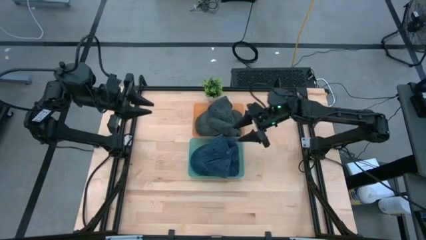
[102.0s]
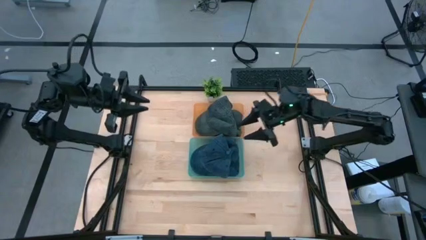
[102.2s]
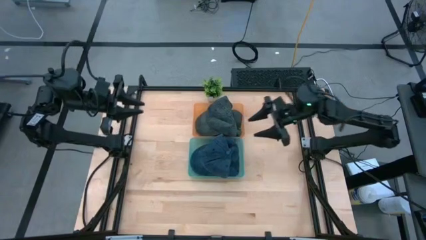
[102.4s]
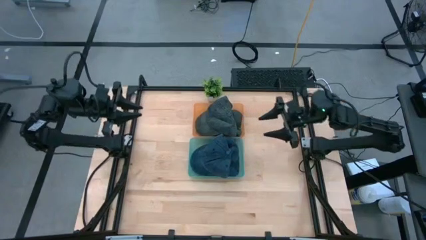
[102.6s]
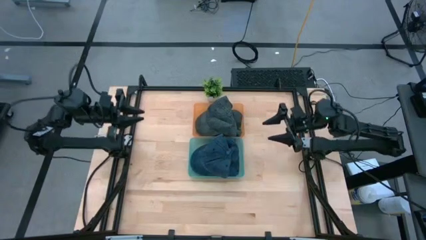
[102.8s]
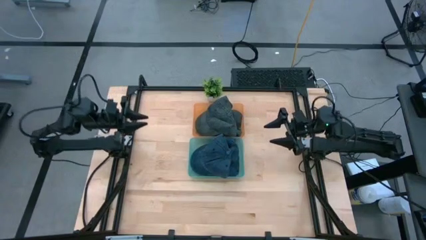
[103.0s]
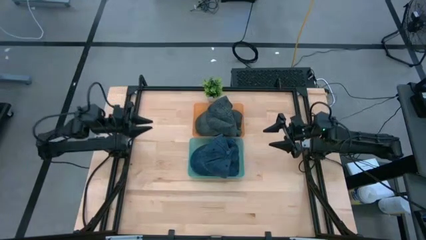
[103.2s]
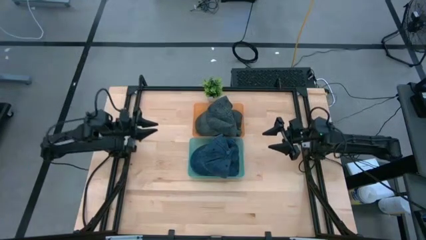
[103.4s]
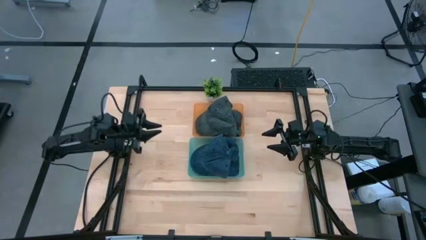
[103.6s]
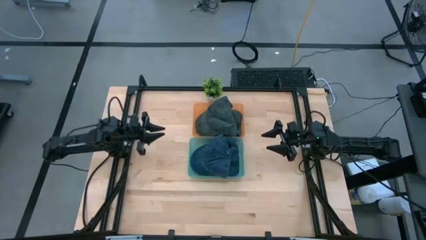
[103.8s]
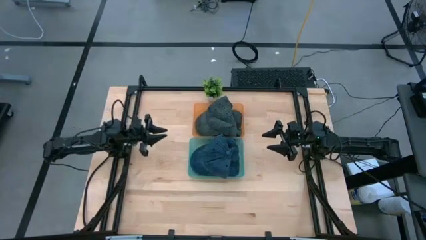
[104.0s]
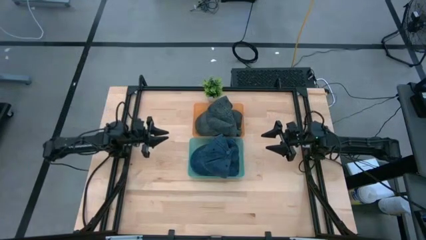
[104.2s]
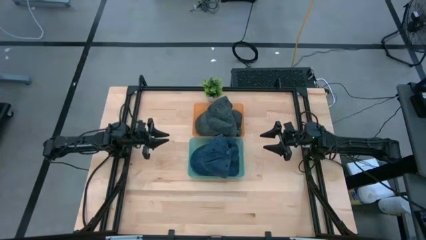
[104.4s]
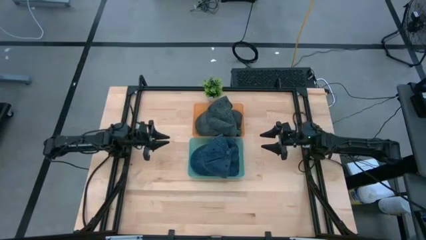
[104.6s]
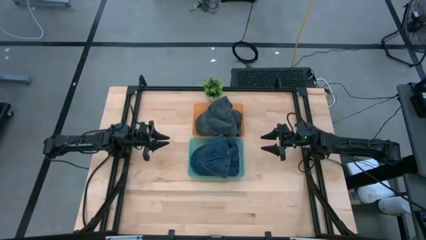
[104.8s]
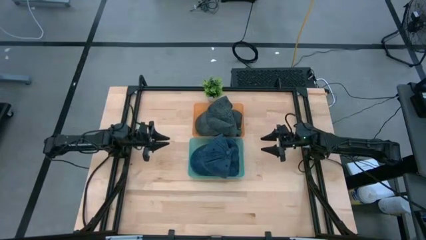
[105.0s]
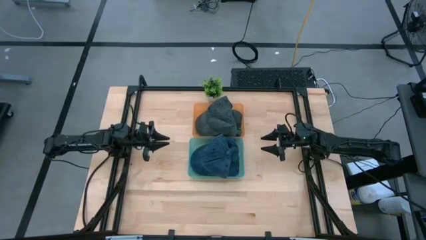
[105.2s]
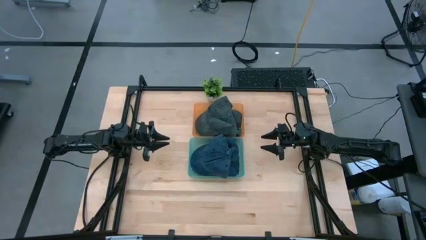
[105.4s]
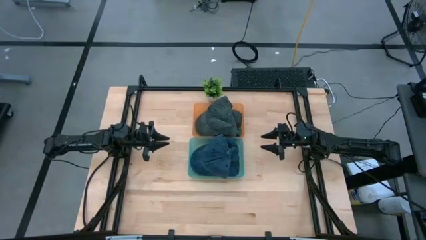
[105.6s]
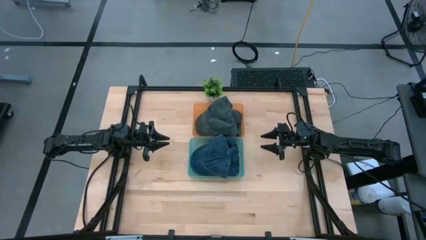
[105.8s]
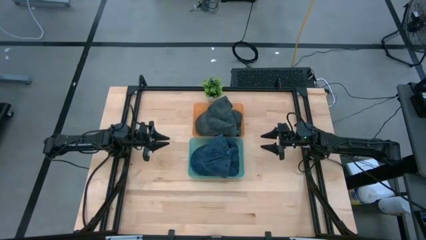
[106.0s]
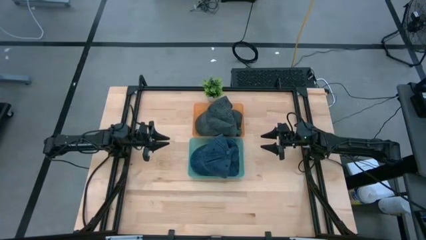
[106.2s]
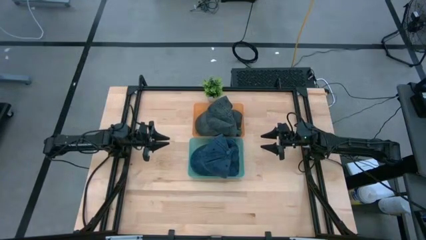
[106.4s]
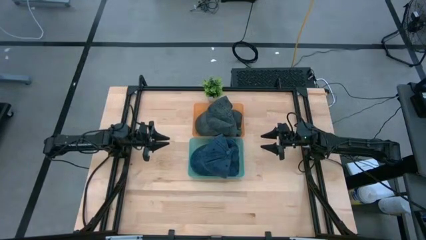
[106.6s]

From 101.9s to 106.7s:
Task: Pick & Place hat
Return to Home Position

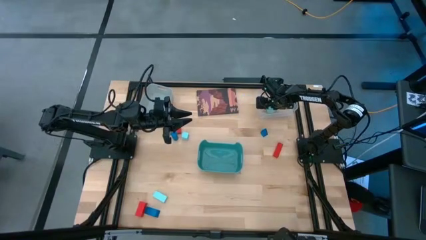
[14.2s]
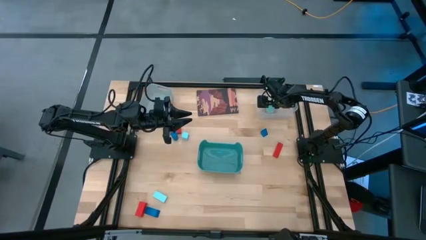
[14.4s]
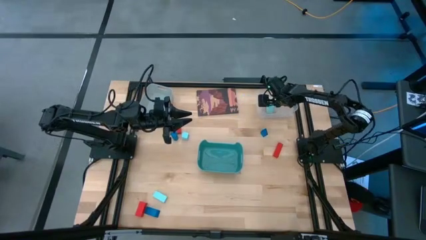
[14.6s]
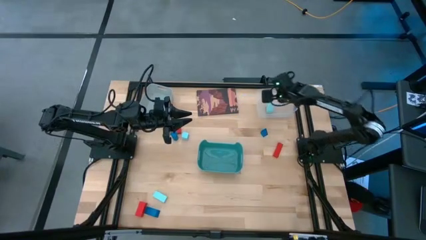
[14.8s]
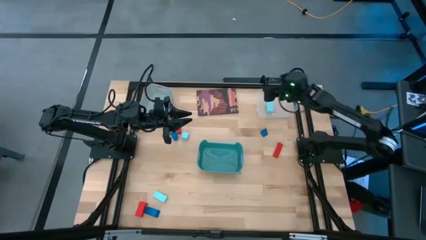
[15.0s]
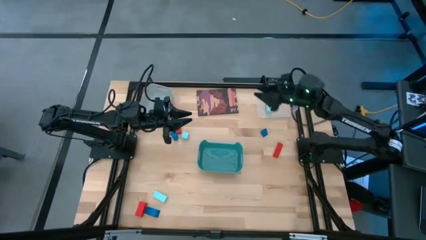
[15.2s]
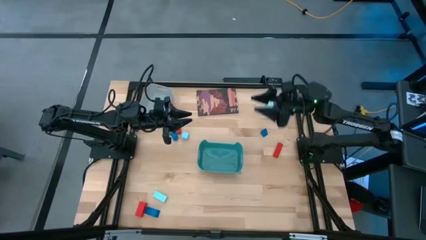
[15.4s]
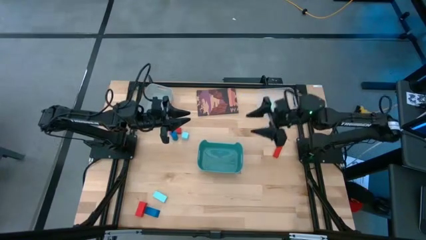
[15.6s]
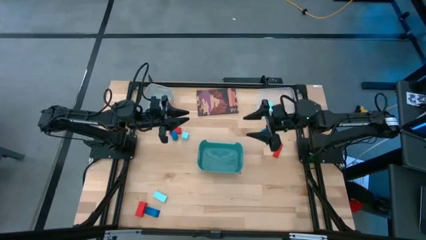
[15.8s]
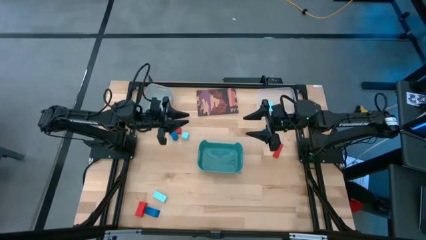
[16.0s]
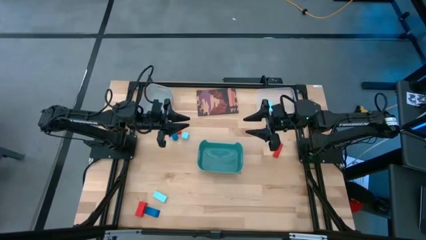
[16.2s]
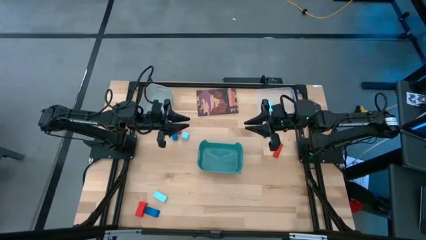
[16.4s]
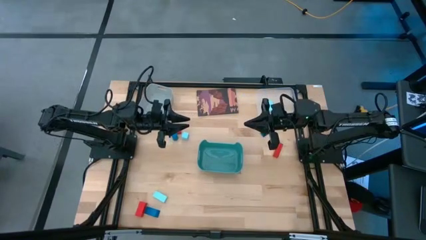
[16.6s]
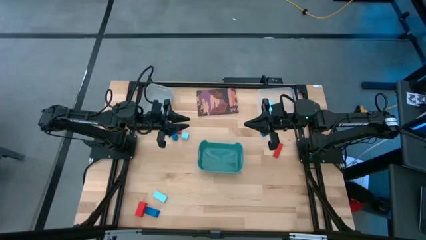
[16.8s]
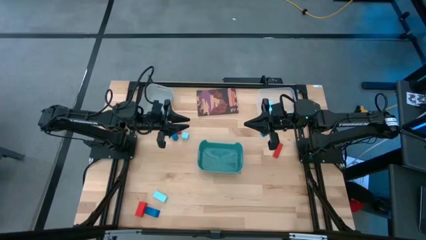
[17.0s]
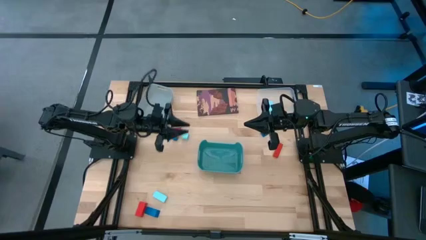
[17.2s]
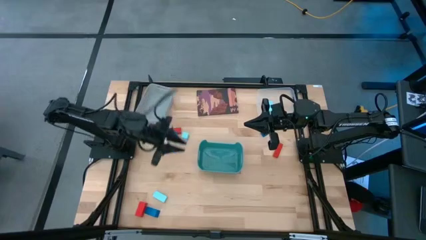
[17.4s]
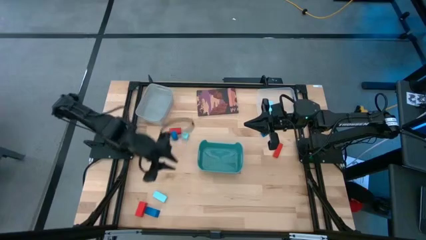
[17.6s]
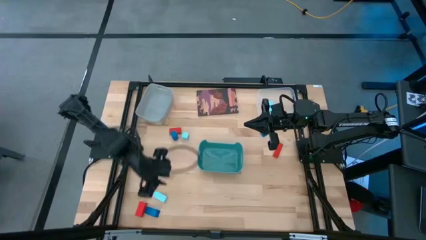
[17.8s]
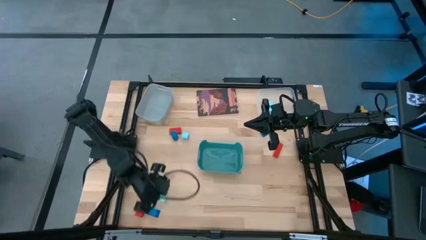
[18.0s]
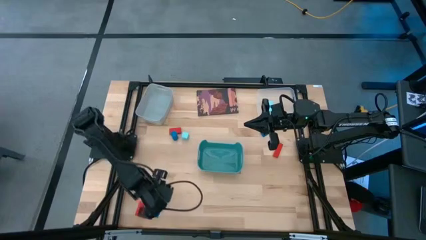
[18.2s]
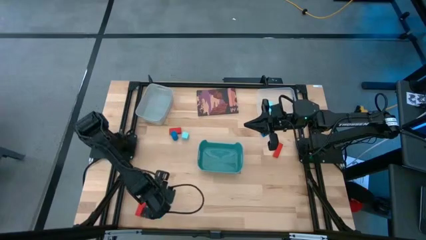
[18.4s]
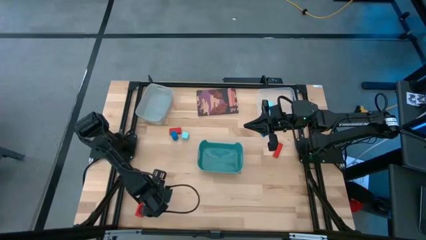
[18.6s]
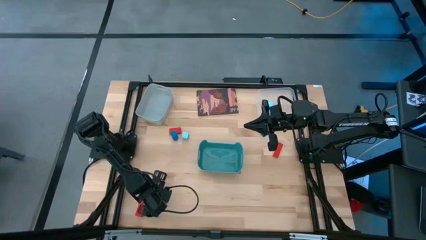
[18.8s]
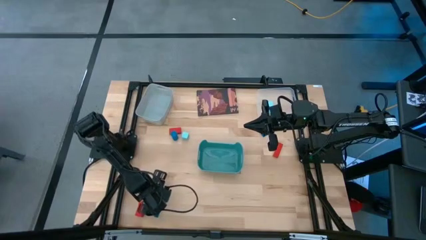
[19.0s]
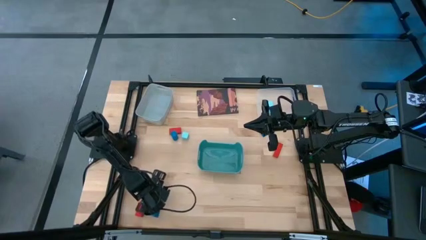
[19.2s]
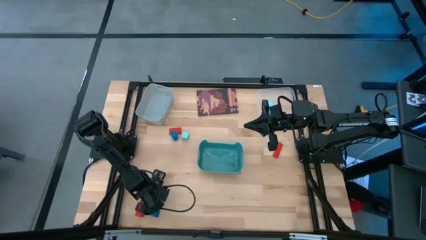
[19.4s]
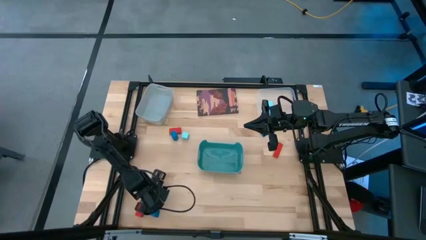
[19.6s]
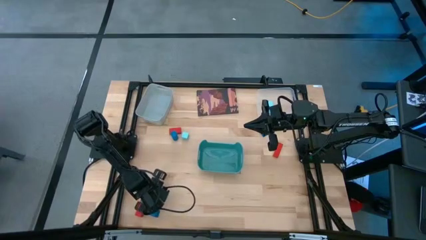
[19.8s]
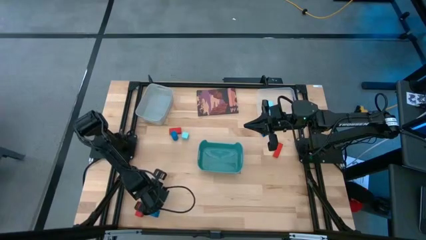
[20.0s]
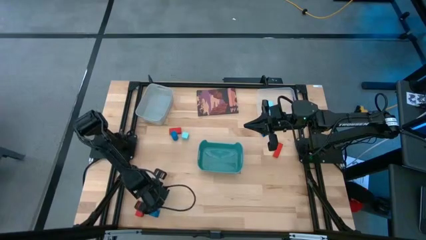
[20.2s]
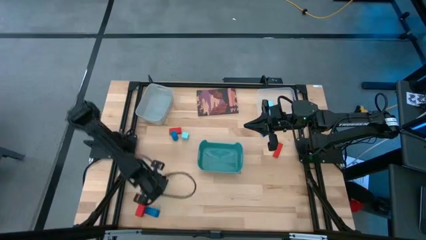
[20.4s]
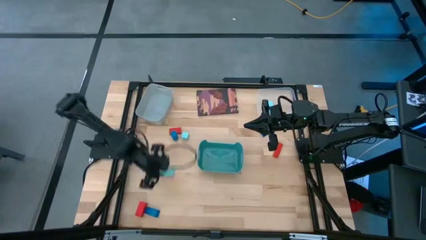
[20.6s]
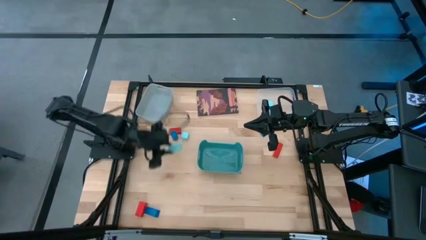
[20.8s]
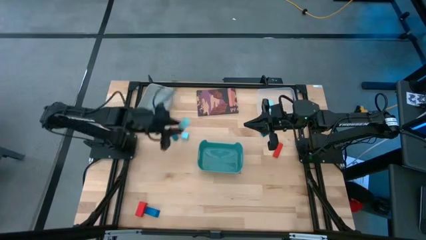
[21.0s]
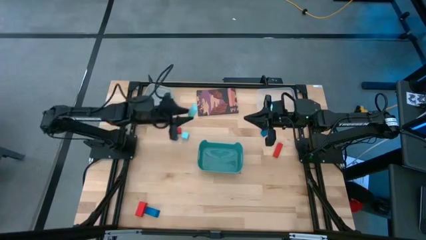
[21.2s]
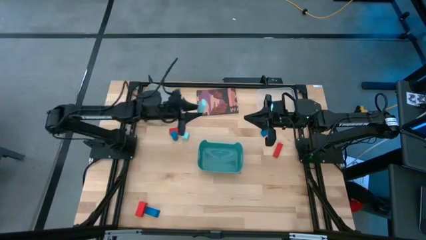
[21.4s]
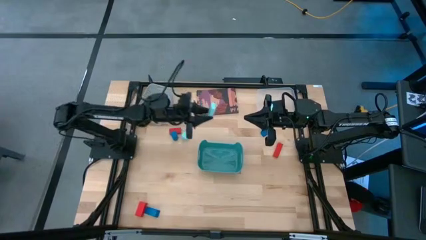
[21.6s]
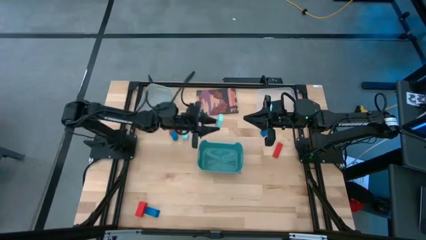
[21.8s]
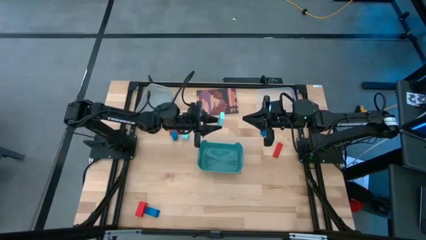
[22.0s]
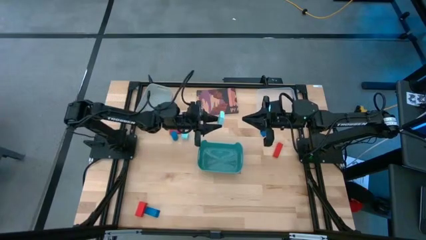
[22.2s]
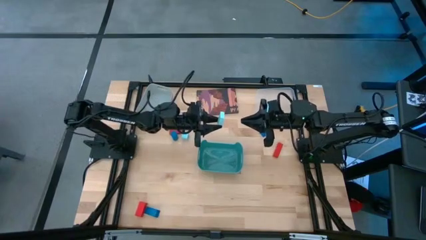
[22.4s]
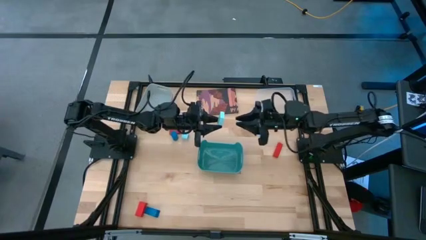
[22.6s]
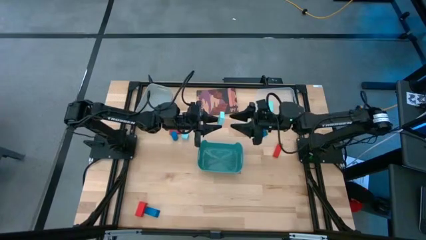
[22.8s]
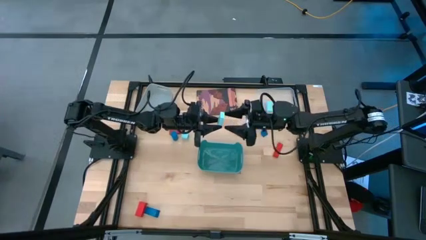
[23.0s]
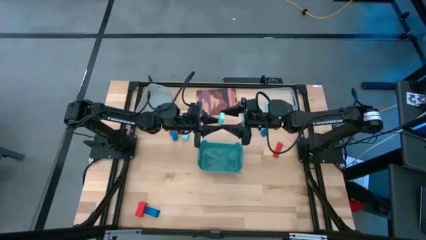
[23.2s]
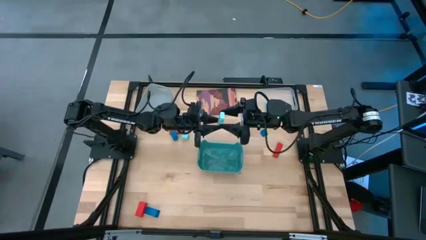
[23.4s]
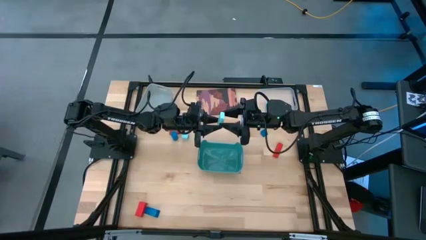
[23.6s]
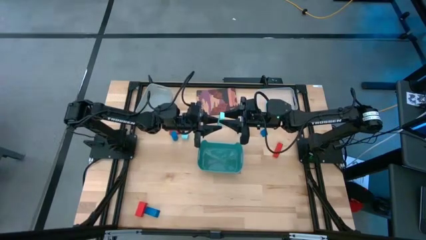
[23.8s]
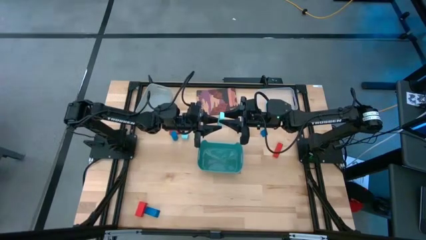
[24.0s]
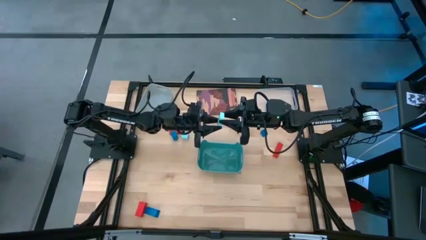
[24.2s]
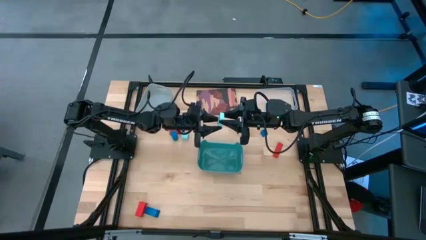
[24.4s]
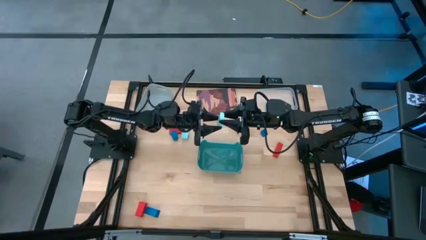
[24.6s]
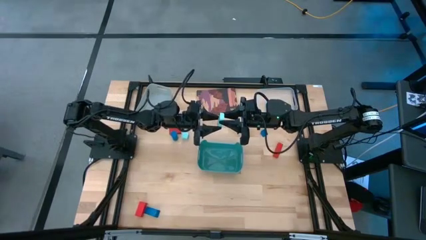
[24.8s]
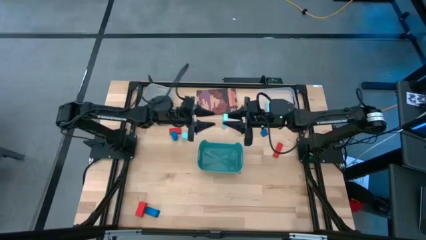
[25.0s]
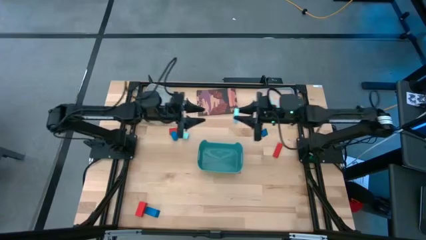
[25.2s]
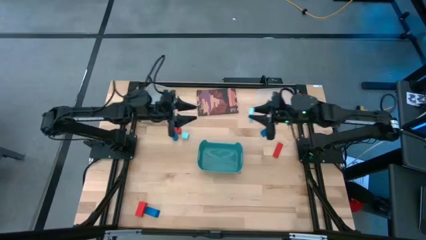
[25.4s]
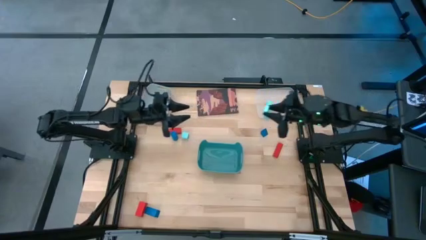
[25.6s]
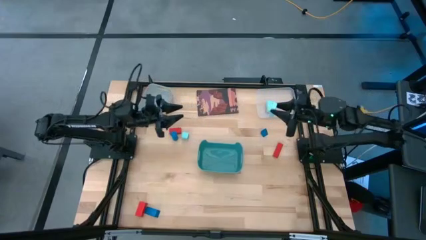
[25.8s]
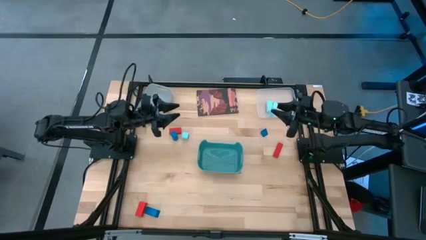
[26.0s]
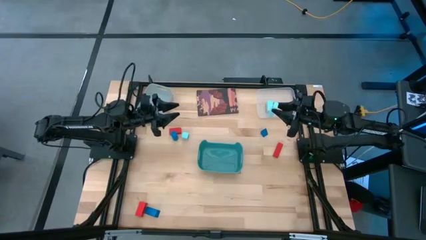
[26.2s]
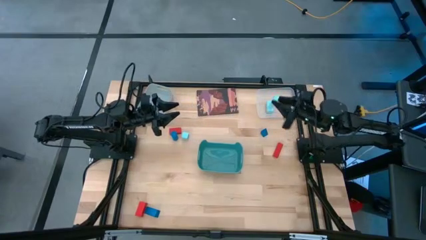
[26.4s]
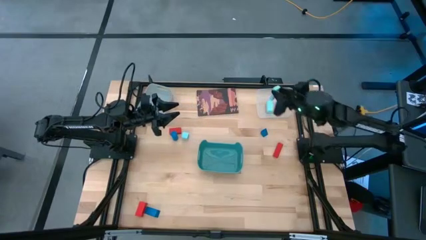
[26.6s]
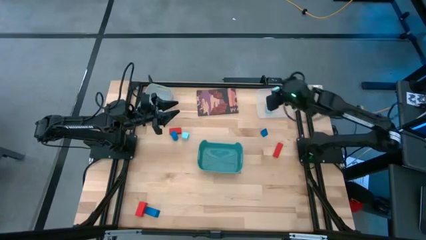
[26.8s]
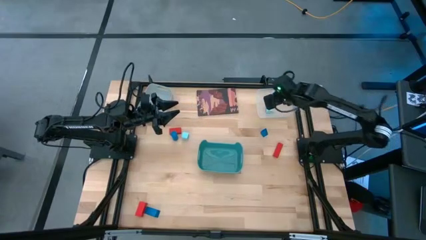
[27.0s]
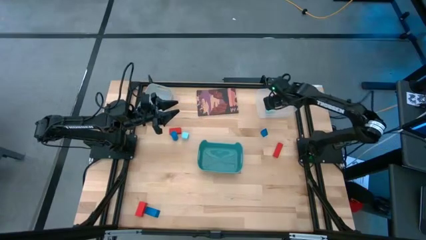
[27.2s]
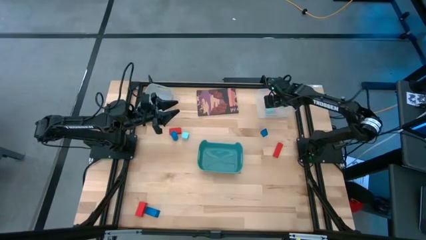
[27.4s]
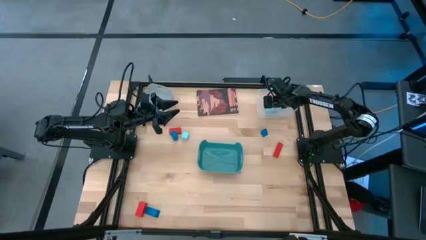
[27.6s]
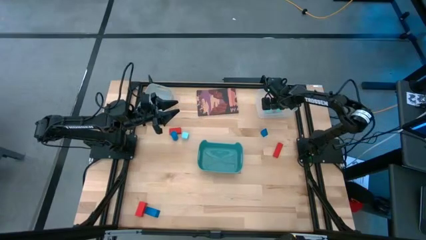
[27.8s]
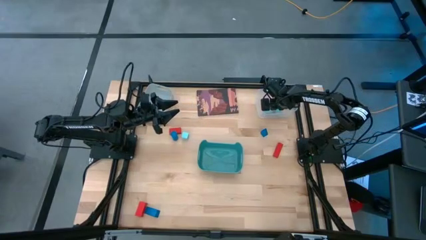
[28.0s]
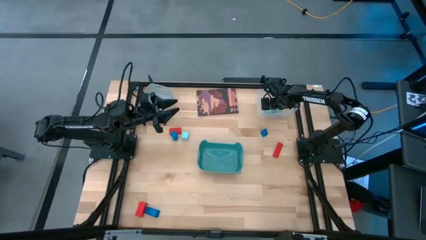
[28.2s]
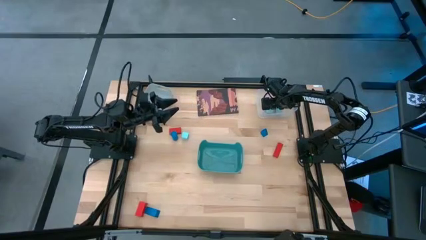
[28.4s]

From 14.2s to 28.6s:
Task: Sort & place blocks by color
Put the rectangular blue green block into the transparent bin
